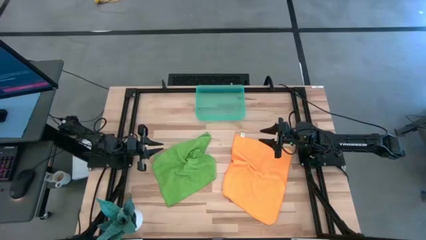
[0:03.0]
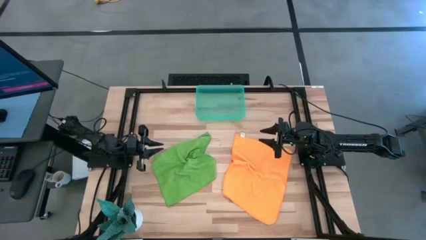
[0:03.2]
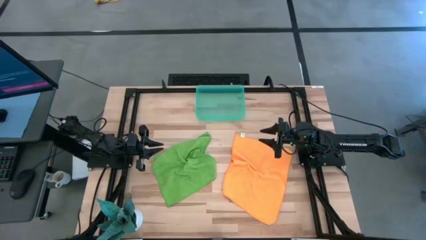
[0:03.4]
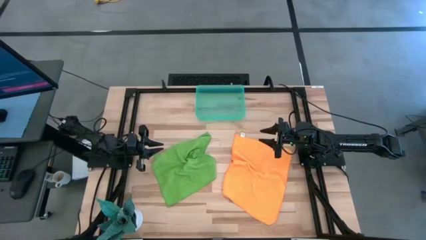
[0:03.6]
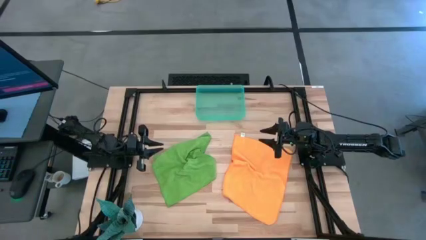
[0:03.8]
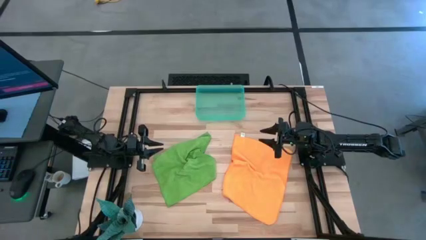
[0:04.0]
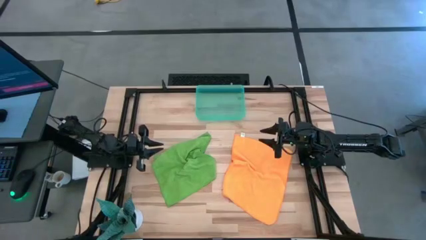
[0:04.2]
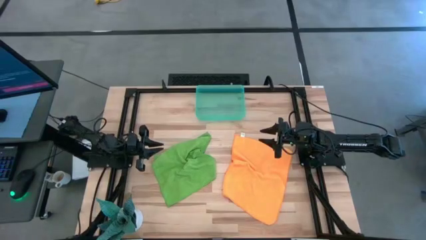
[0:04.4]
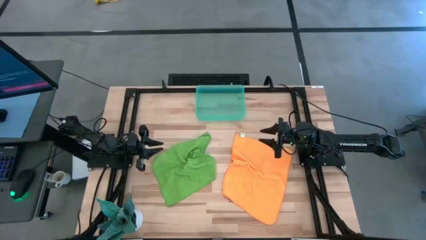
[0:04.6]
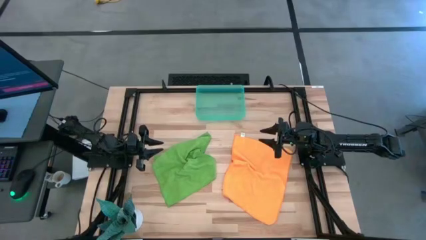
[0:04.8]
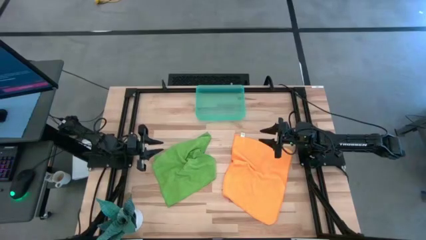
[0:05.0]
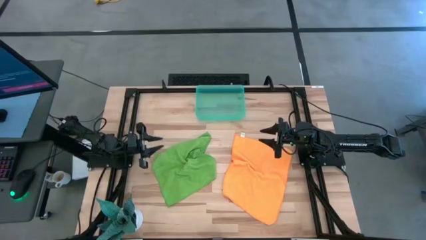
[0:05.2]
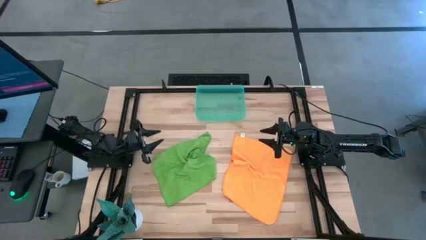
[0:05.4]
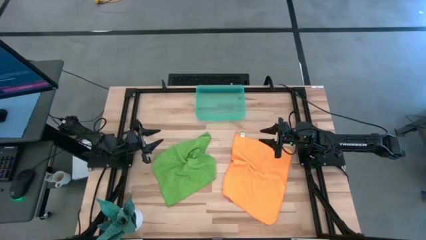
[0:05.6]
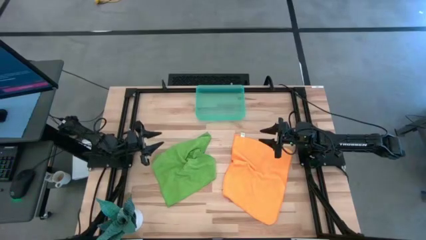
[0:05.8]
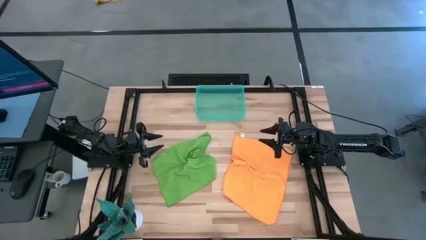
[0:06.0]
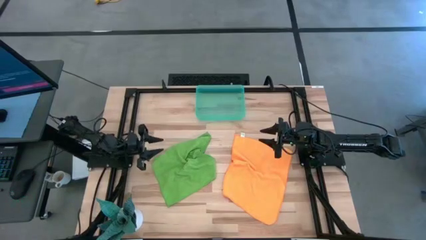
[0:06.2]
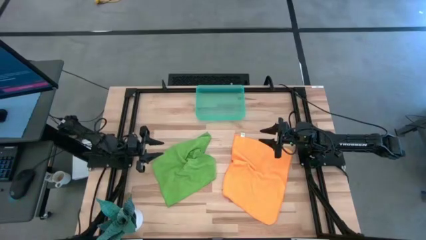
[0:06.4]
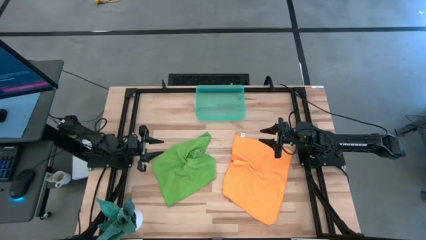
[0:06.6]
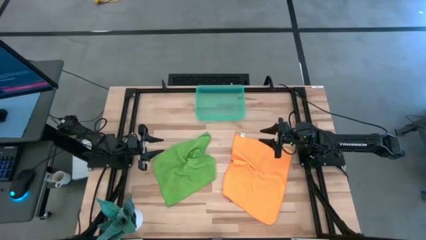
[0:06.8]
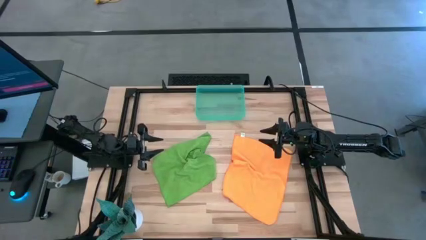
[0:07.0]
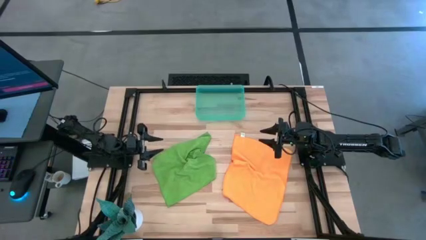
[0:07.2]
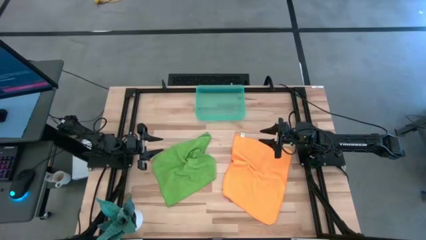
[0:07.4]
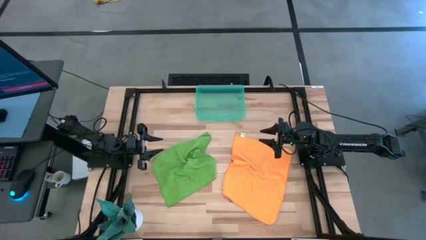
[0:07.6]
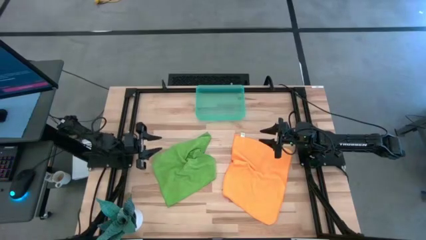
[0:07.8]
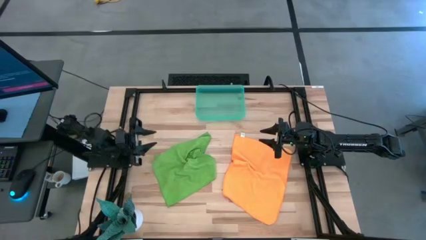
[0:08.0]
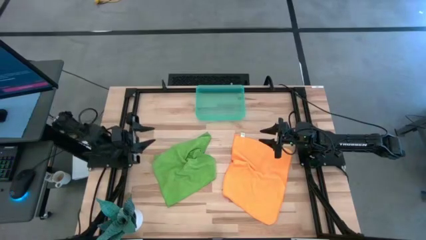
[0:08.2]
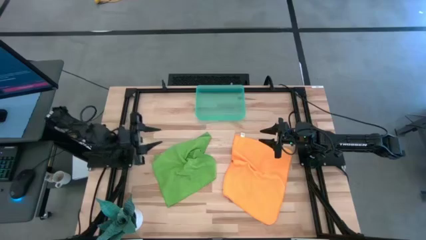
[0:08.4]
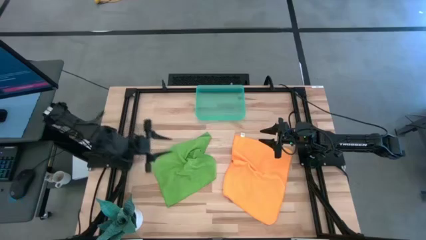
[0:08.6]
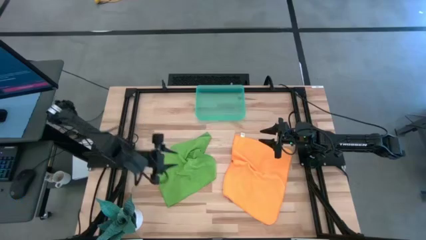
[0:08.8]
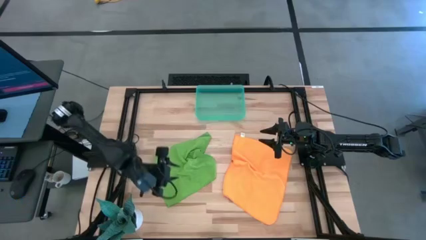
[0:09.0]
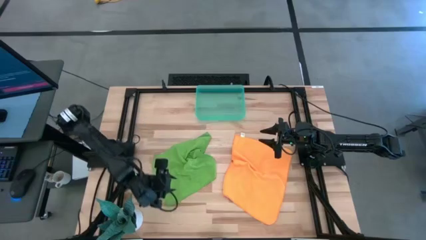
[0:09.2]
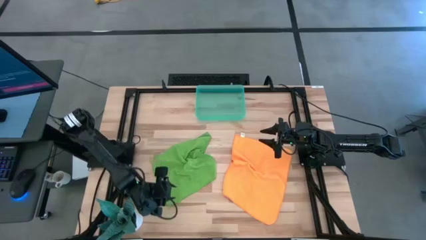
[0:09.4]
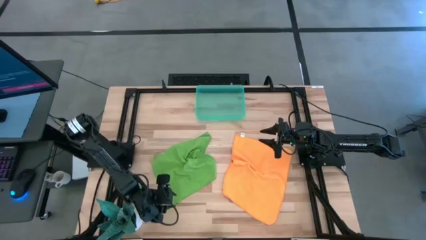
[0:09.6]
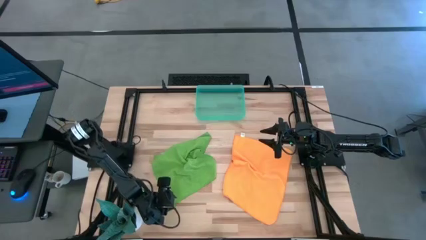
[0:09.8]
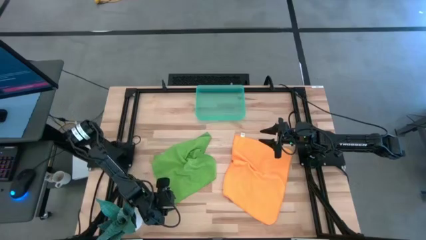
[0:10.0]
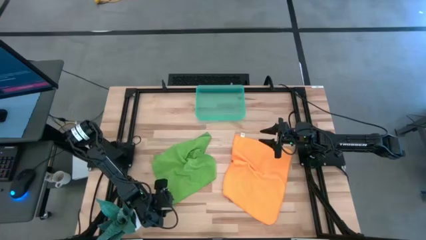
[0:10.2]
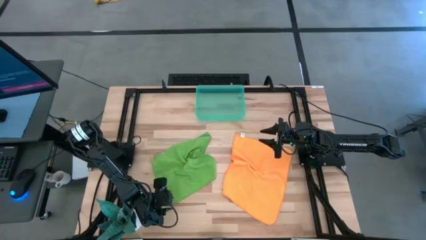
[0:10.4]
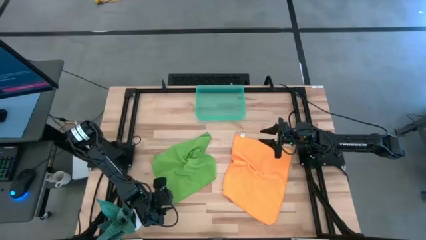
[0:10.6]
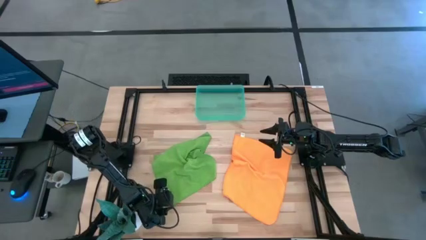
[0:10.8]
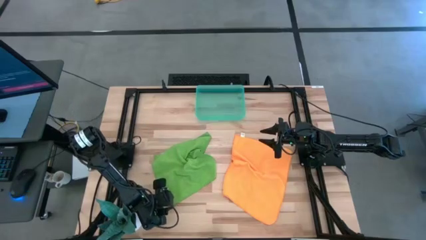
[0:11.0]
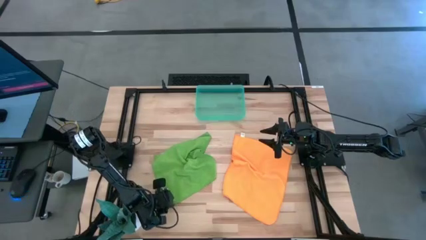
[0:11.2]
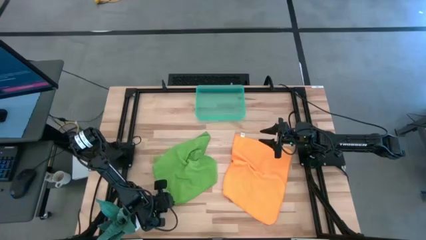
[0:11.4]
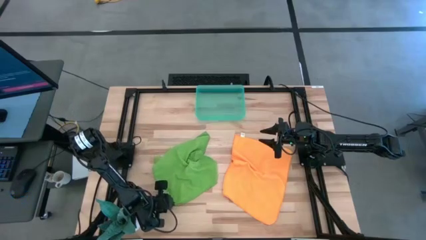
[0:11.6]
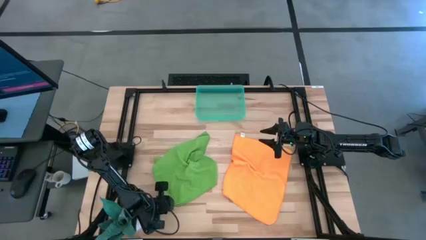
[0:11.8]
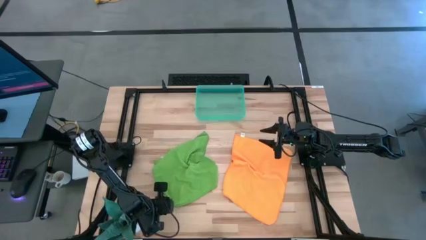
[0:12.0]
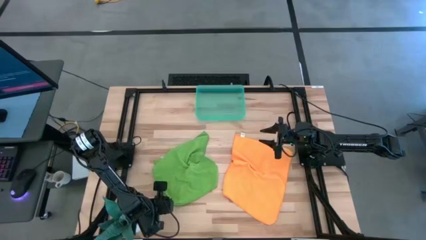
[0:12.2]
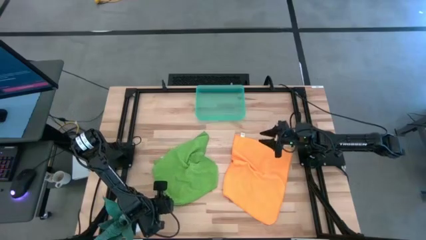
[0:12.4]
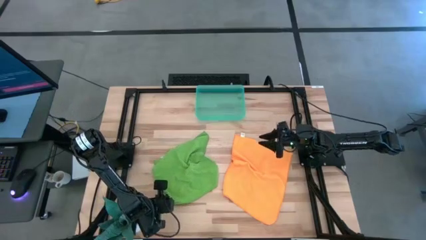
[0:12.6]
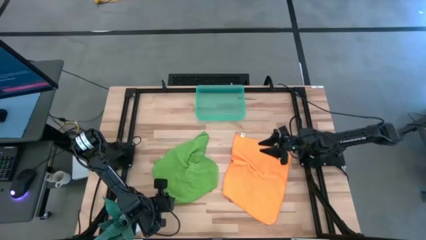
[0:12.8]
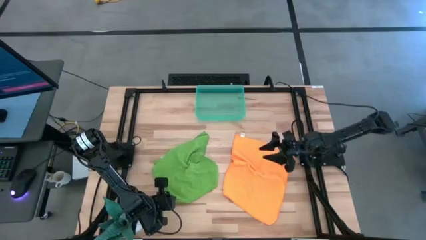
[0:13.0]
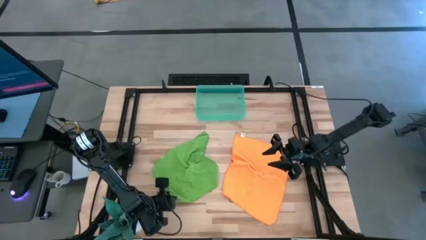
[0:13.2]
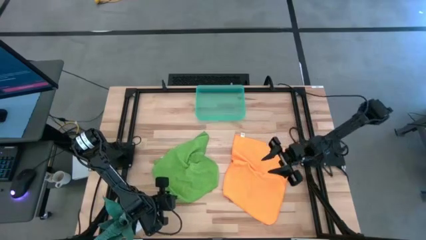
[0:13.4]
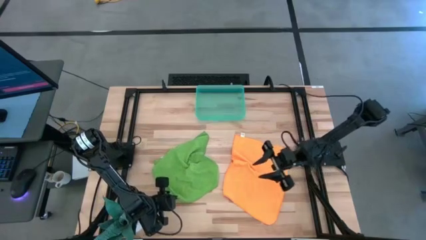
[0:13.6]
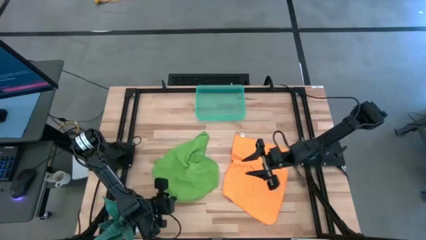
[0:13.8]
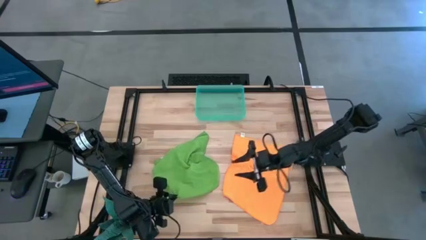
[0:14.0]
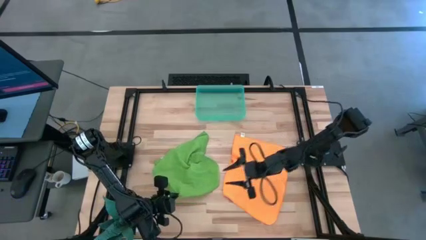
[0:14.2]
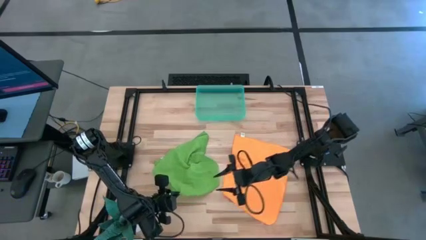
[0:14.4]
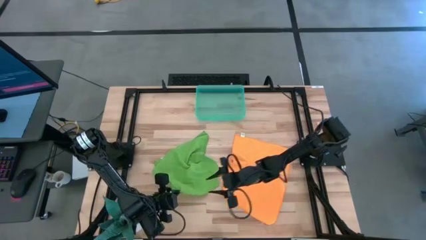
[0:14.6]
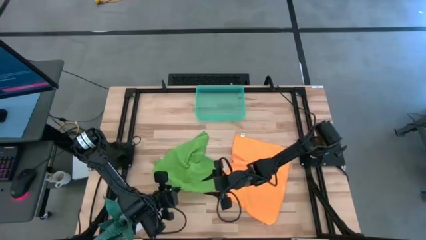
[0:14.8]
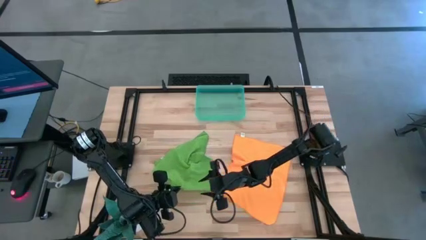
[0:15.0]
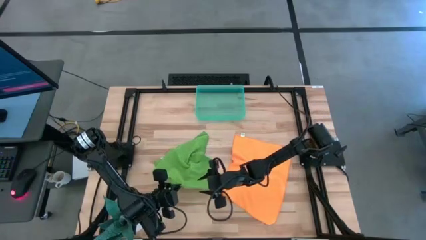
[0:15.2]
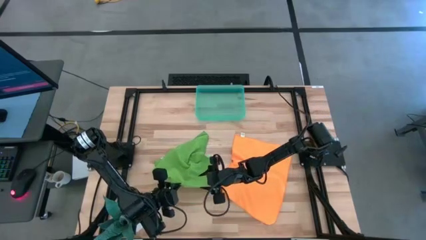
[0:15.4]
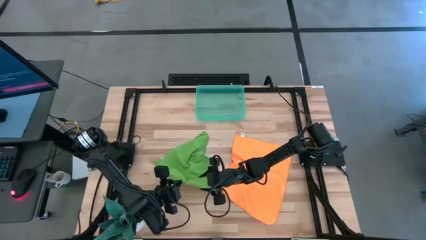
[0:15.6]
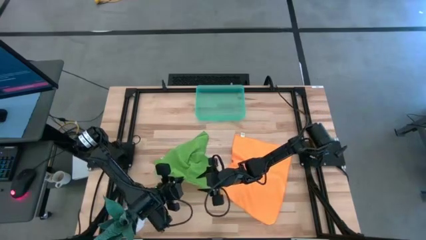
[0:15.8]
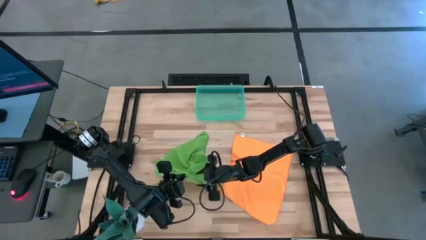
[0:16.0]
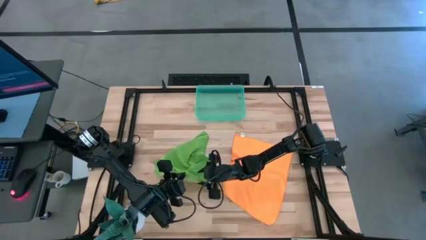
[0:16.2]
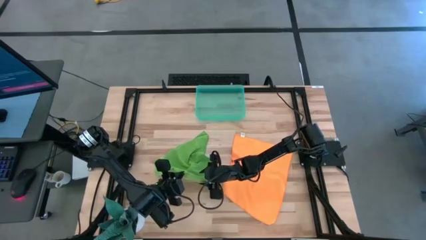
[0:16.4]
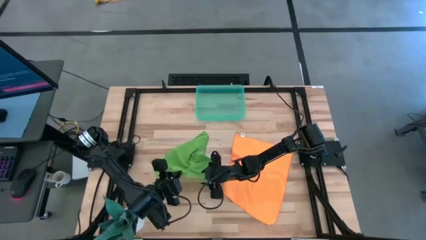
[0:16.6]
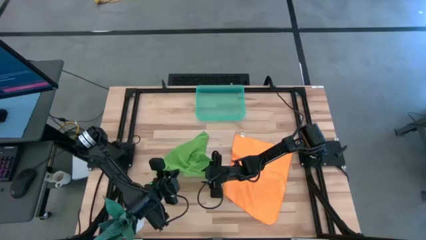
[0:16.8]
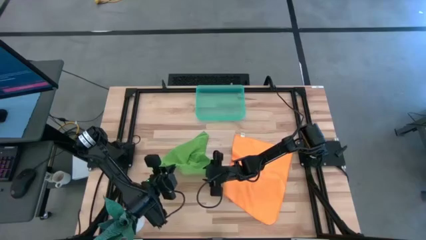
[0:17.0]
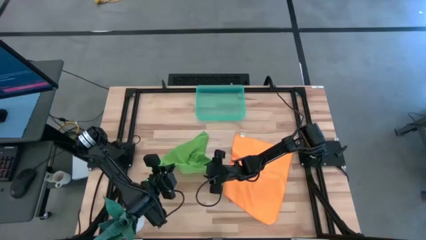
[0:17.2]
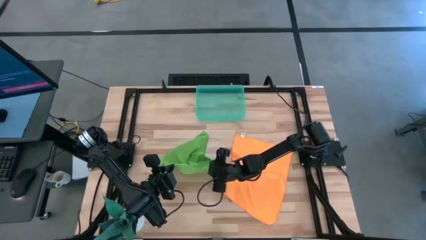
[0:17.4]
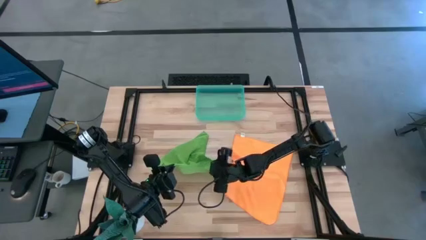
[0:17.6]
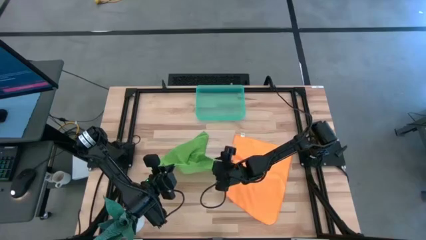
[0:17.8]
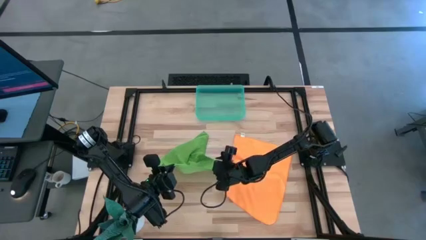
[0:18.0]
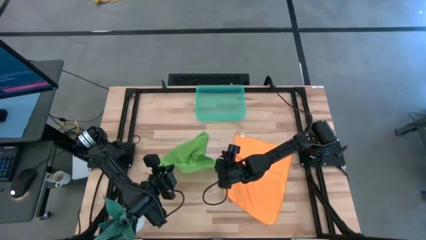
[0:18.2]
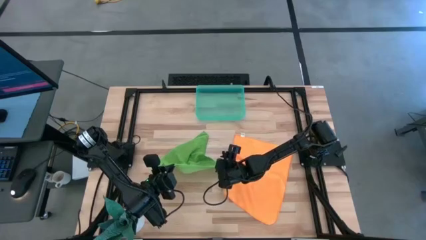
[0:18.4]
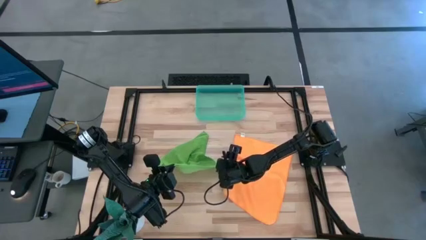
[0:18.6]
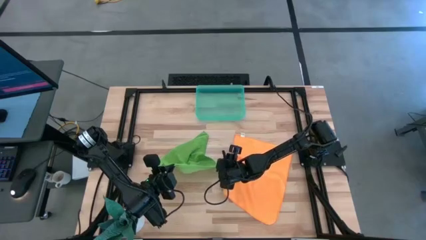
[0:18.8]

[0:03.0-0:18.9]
Task: Roll microfiber towels into tight, uniform cylinder then place into a basket
Fold the green microfiber towel
